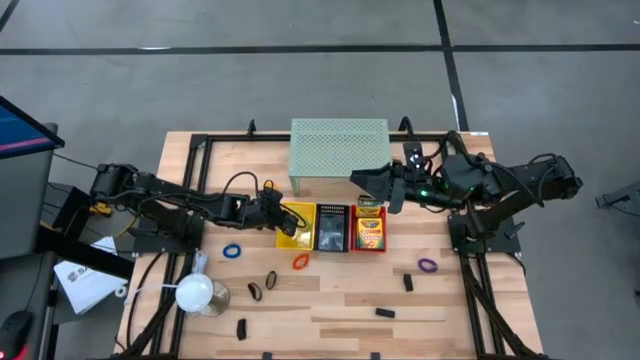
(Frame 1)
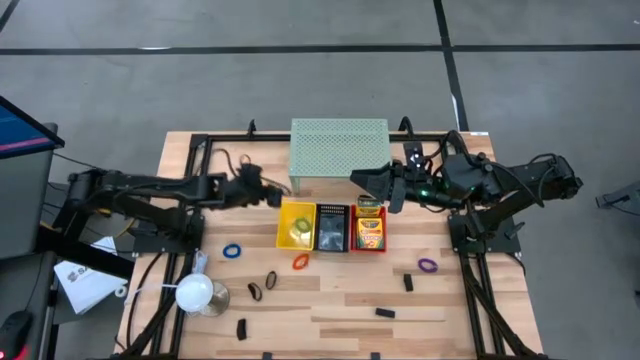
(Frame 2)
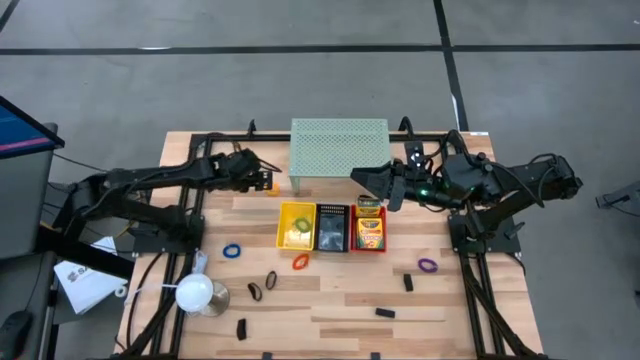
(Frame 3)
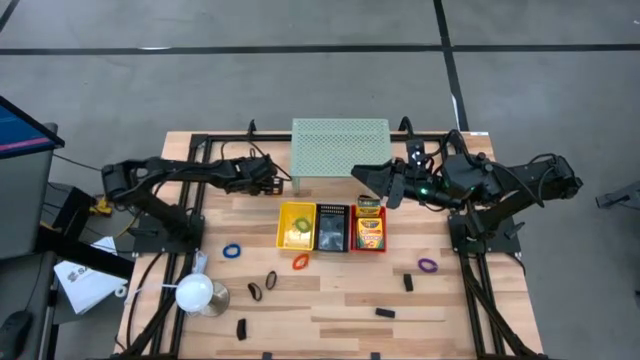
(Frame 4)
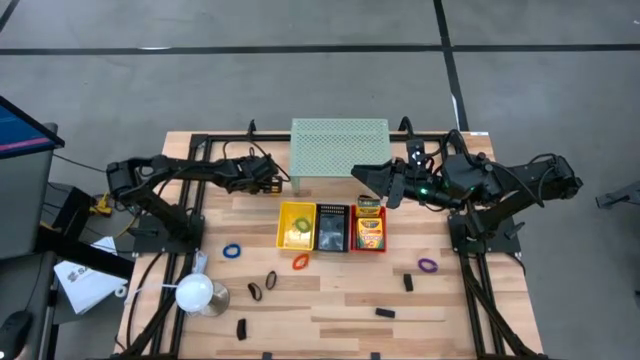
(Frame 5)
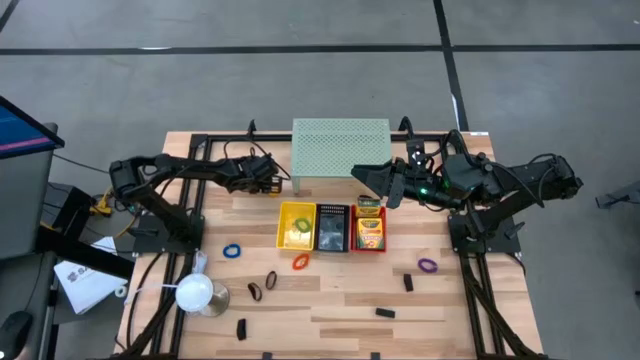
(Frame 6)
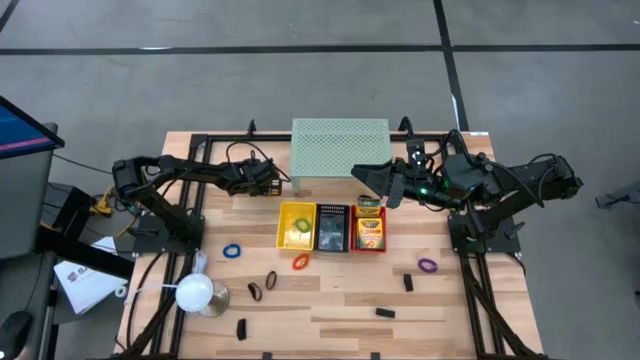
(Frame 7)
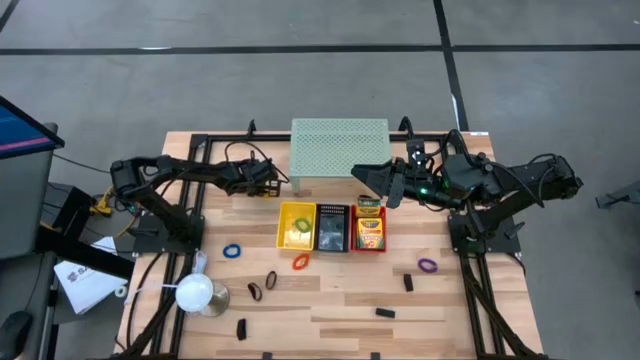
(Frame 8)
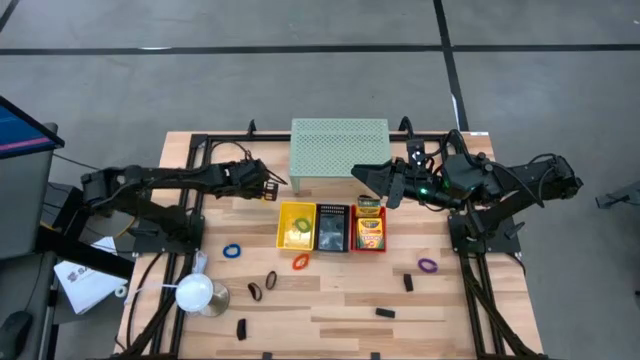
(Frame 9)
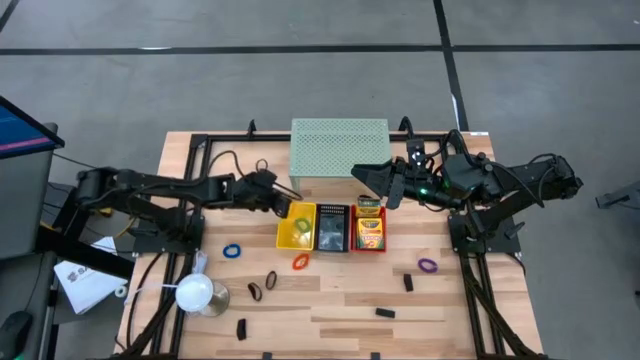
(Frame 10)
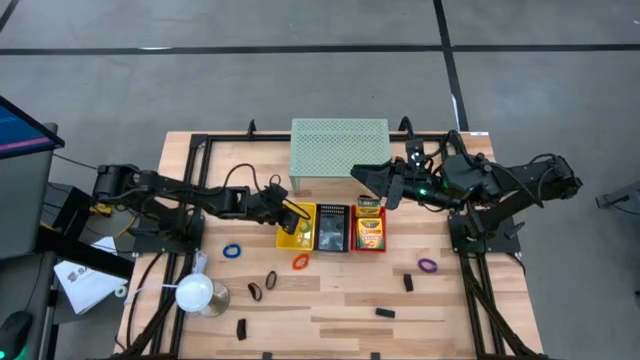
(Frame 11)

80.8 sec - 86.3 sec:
Task: Pick & Place Office Desk Supplies
Put the yellow spring keychain into the yellow bin

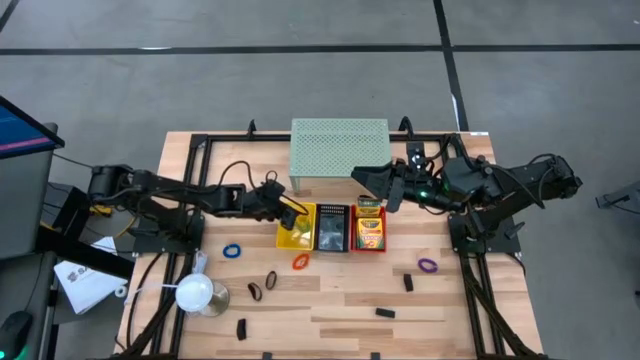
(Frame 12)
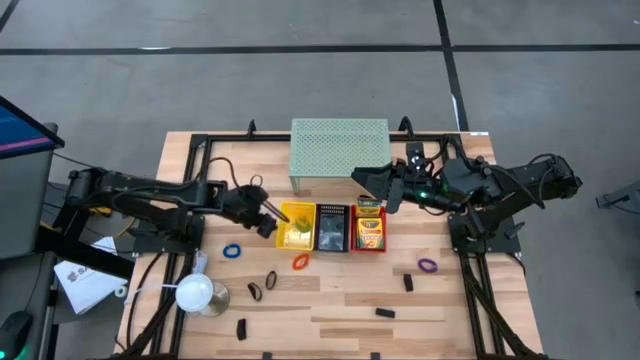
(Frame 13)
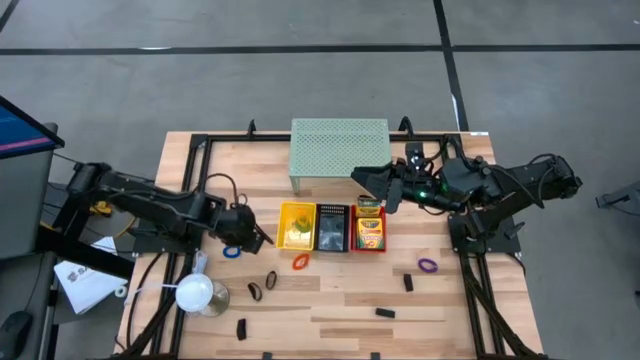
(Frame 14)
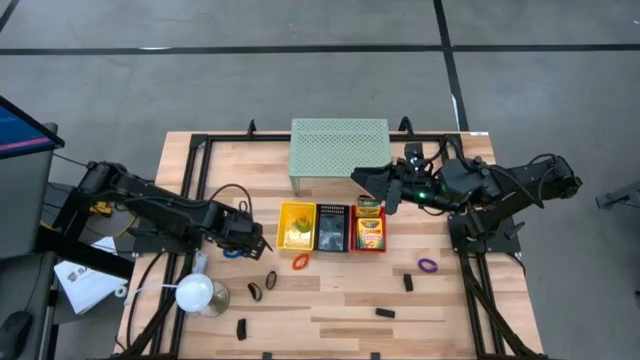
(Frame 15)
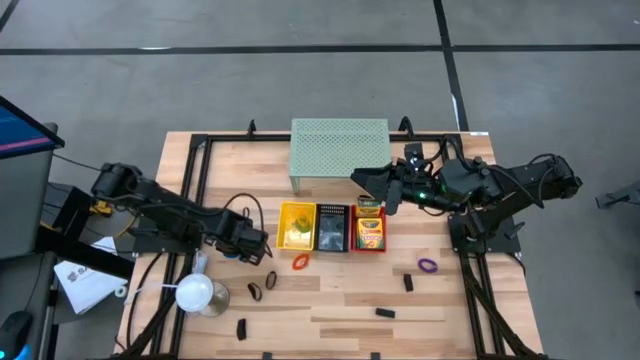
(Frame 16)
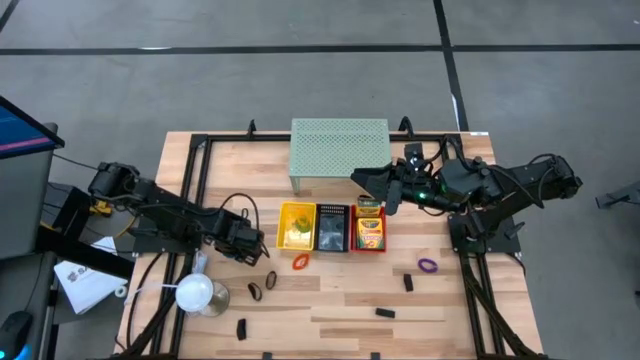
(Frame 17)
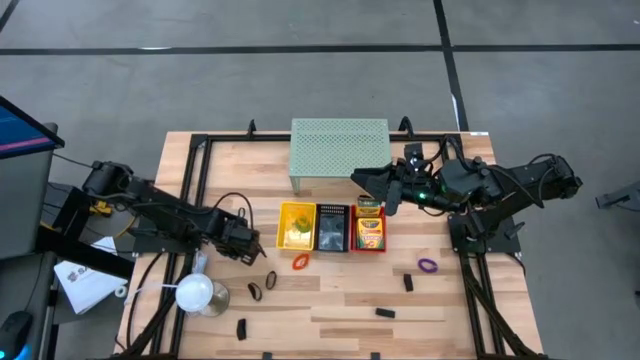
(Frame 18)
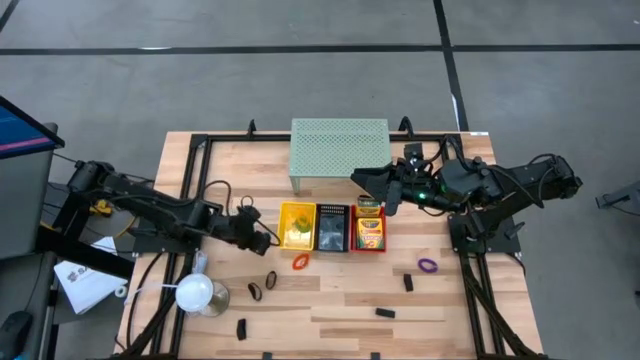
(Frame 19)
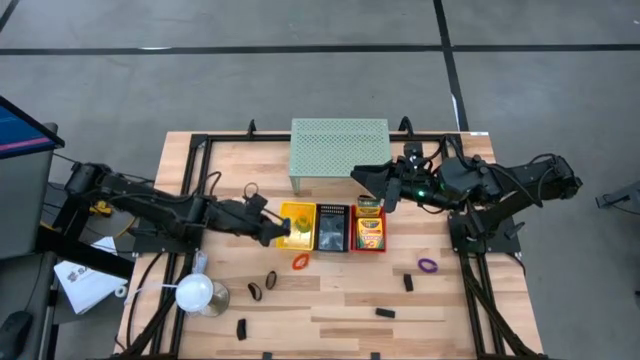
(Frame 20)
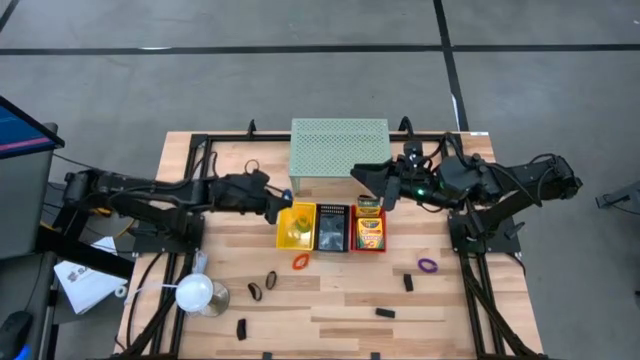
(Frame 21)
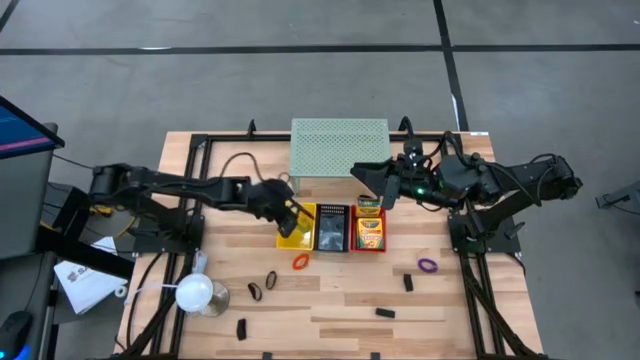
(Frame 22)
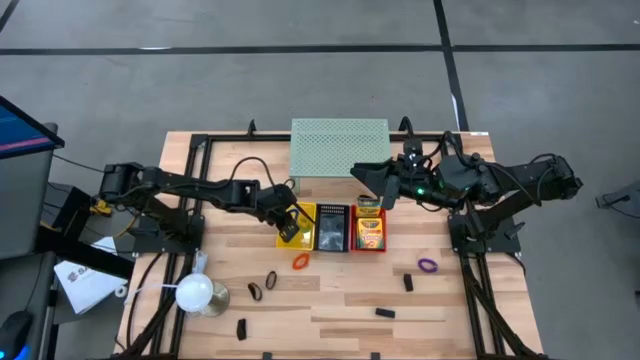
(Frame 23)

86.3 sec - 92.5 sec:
Put the blue spring keychain into the yellow bin

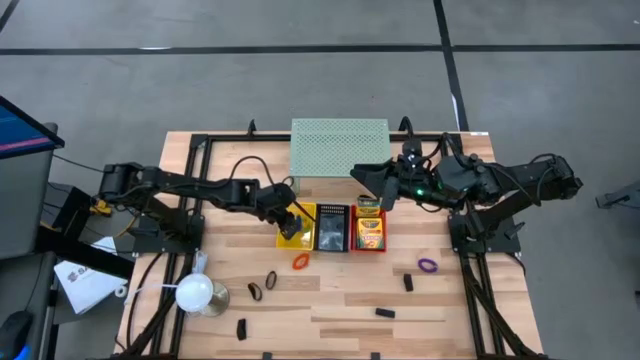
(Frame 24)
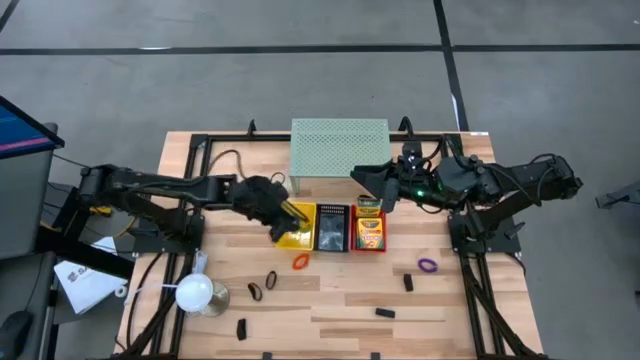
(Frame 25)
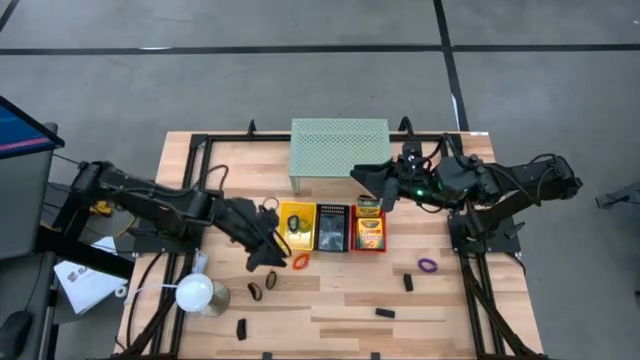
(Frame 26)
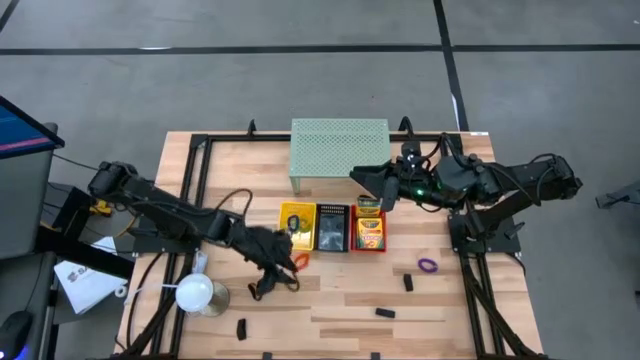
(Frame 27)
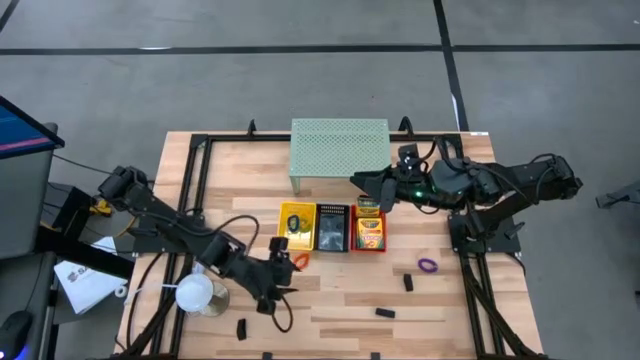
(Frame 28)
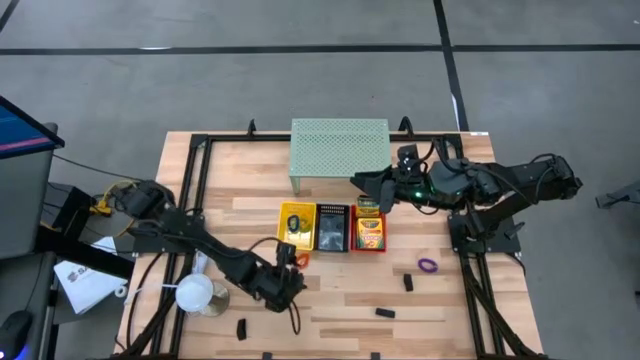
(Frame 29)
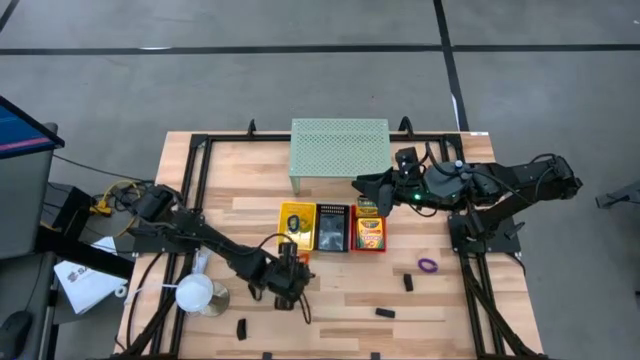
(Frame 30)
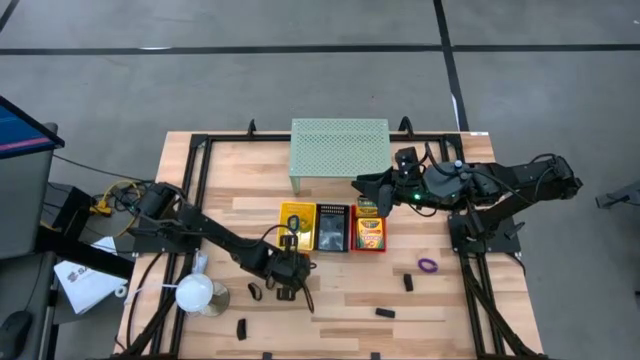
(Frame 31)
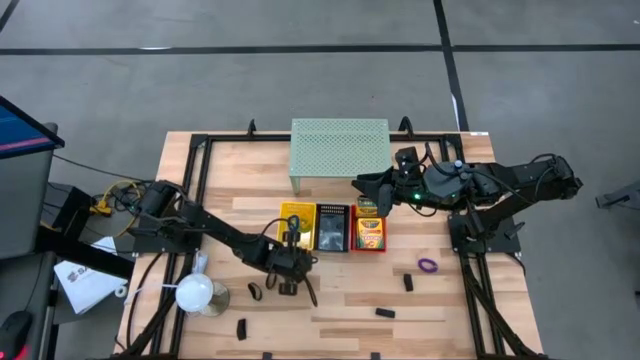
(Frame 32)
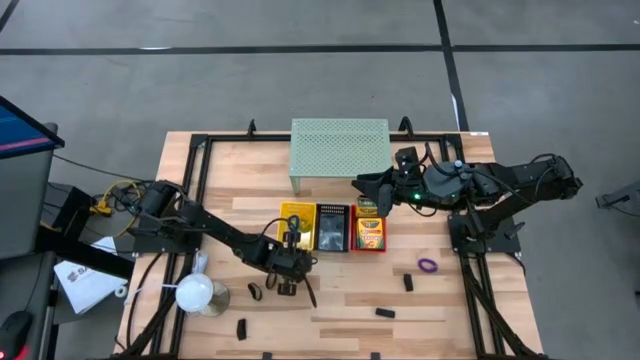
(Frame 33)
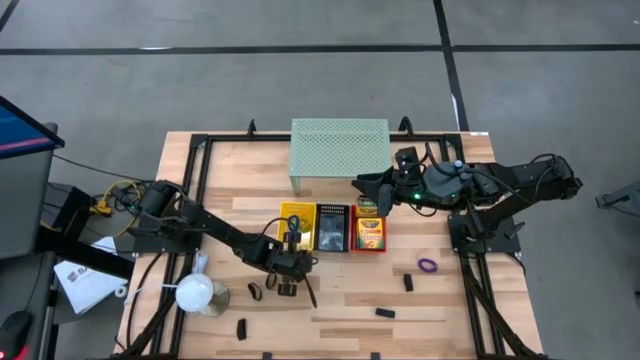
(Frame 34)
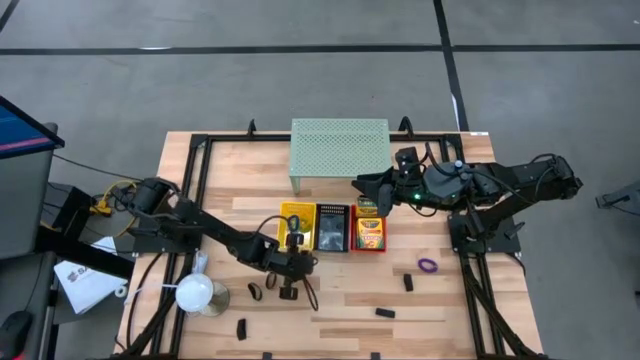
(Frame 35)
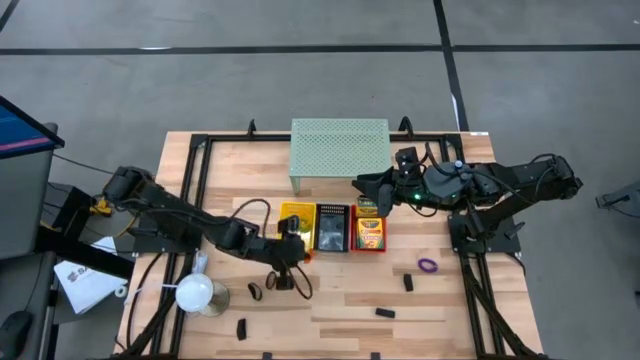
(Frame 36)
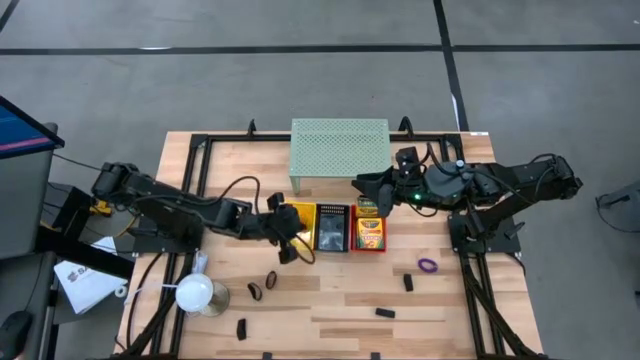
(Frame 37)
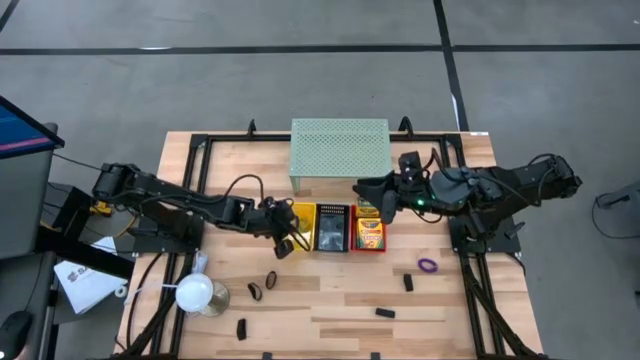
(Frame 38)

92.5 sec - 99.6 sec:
Put the orange spring keychain into the yellow bin

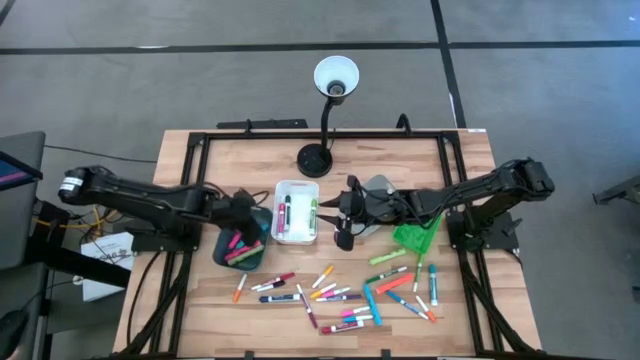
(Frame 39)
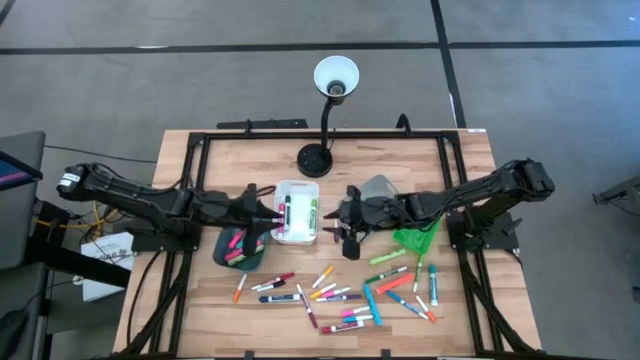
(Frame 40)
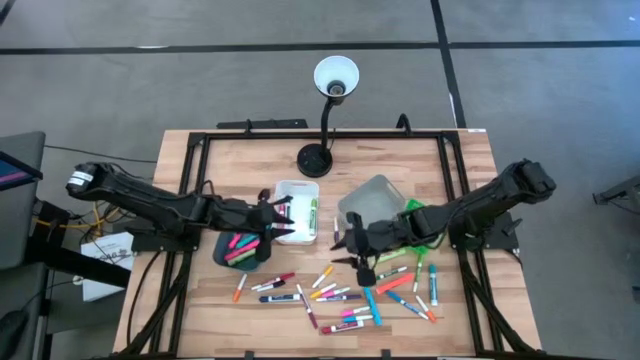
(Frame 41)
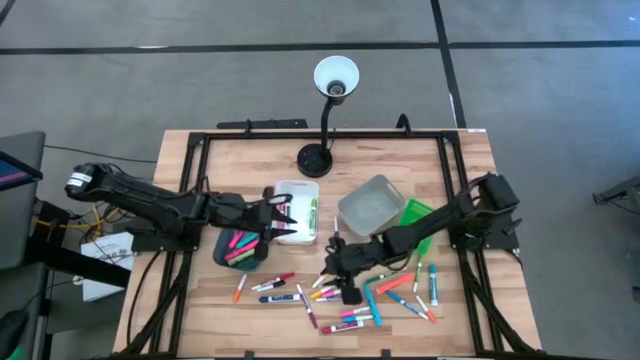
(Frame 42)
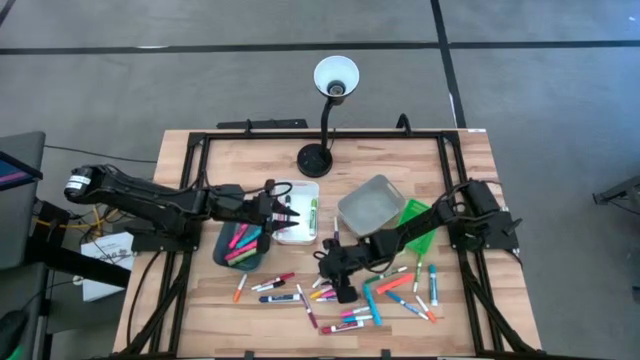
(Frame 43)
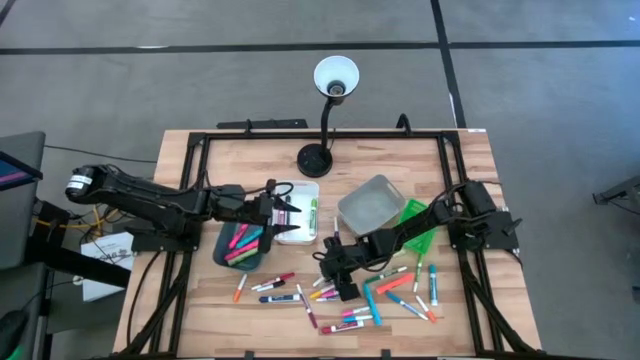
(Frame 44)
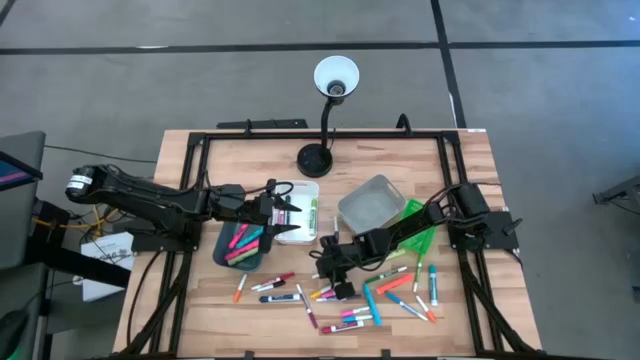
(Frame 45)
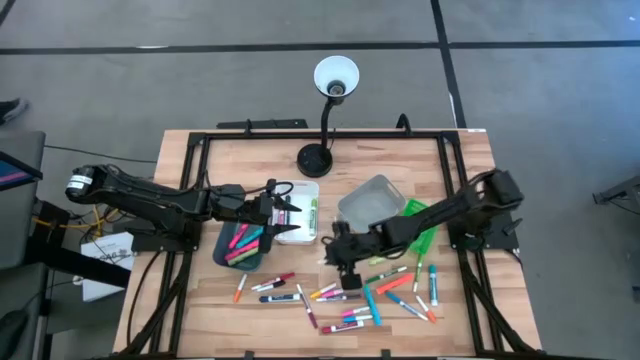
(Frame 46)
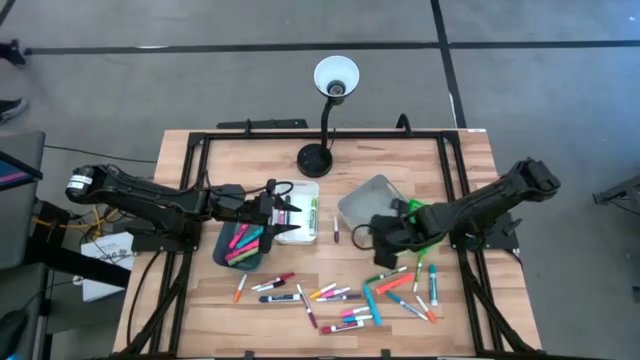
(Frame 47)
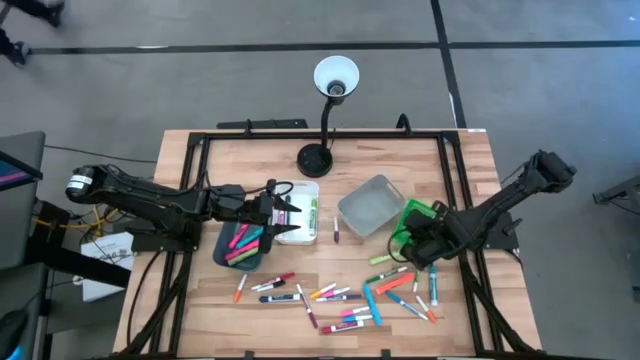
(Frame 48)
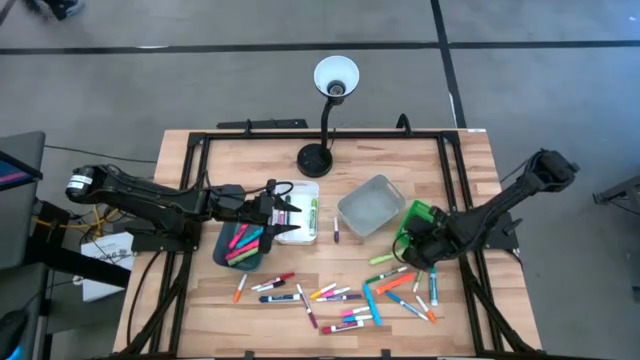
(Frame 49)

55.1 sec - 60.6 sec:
Task: Pick & Place Markers
Put the top yellow mini marker into the green bin
